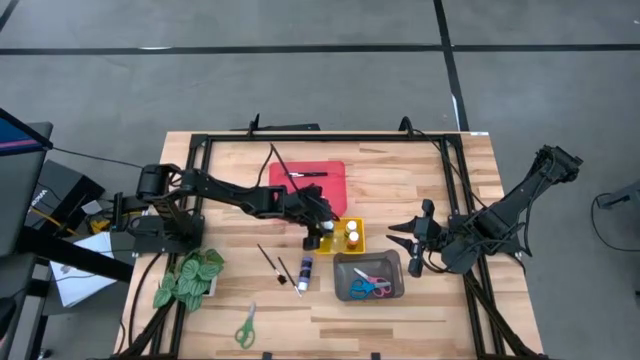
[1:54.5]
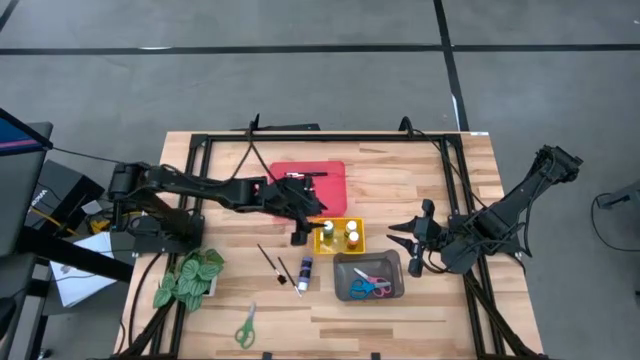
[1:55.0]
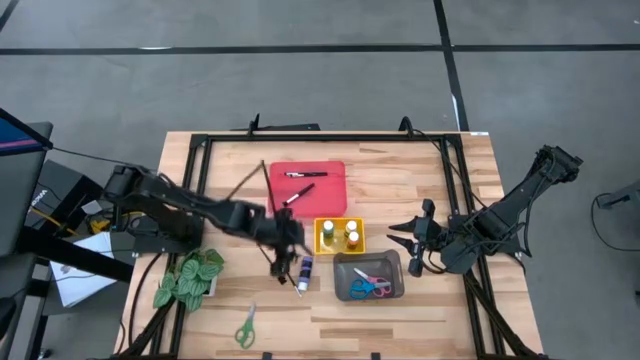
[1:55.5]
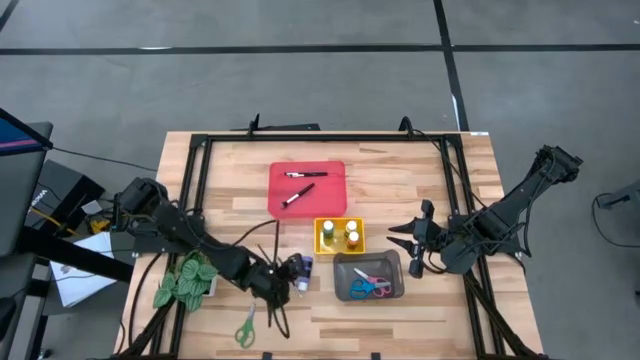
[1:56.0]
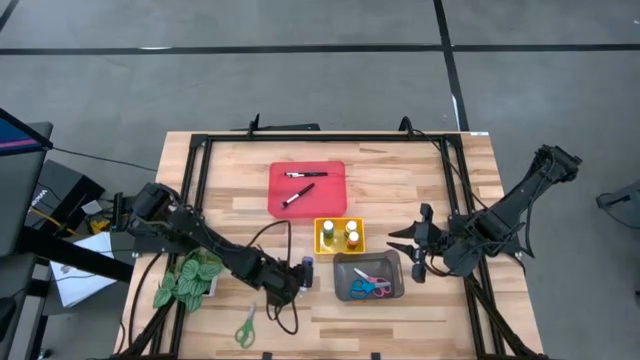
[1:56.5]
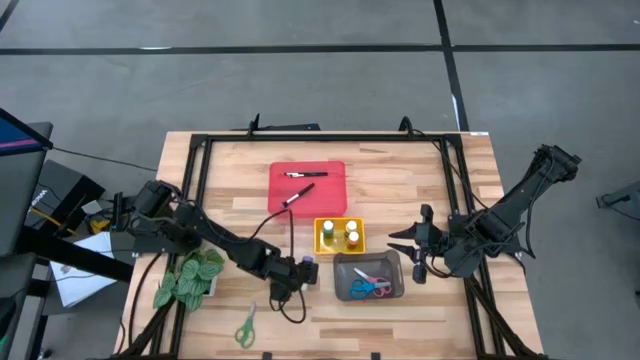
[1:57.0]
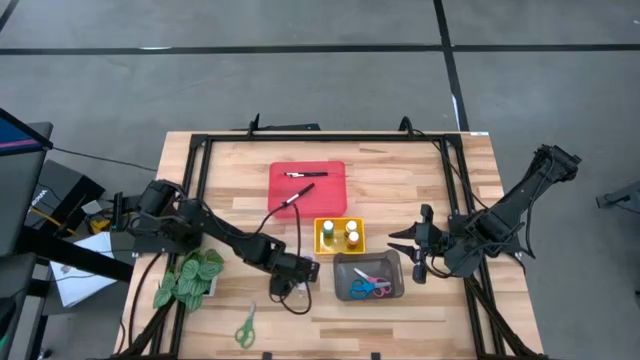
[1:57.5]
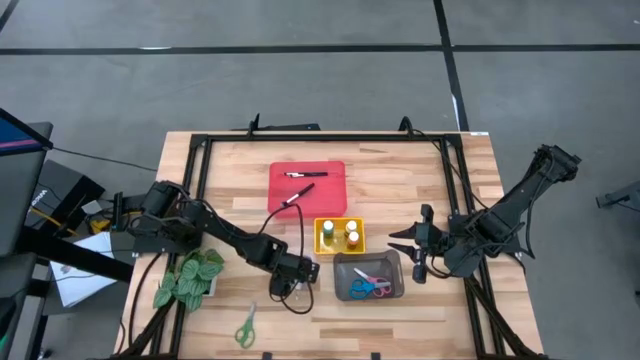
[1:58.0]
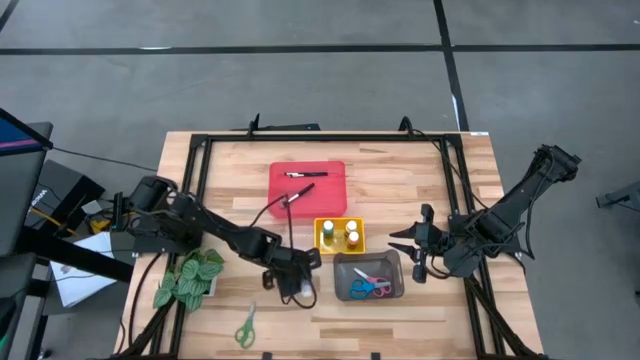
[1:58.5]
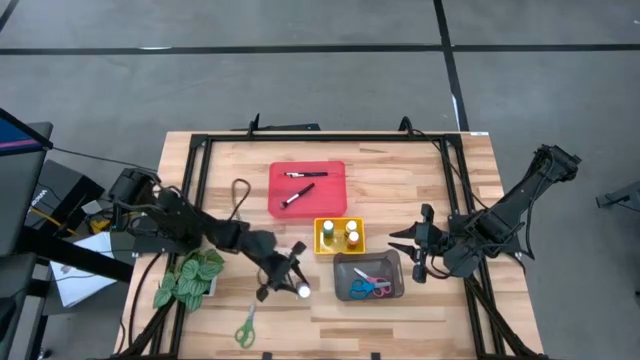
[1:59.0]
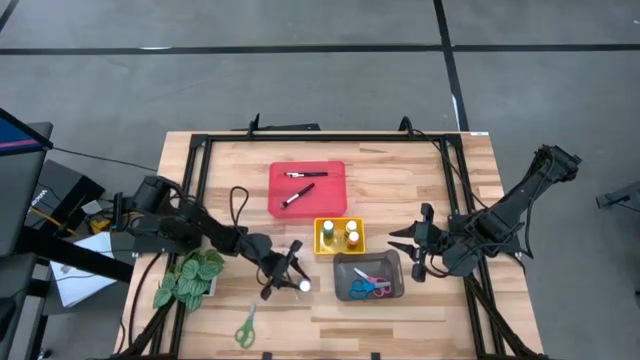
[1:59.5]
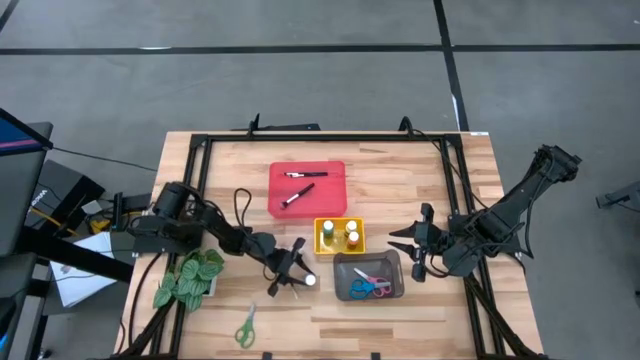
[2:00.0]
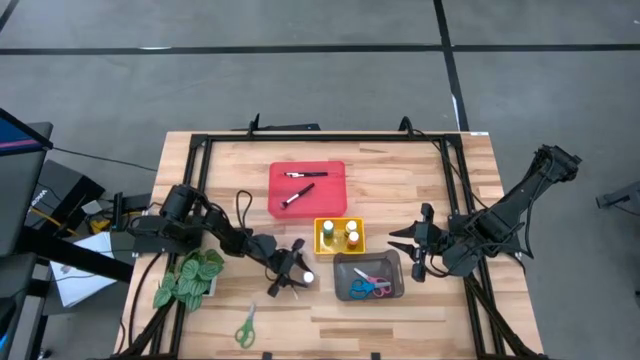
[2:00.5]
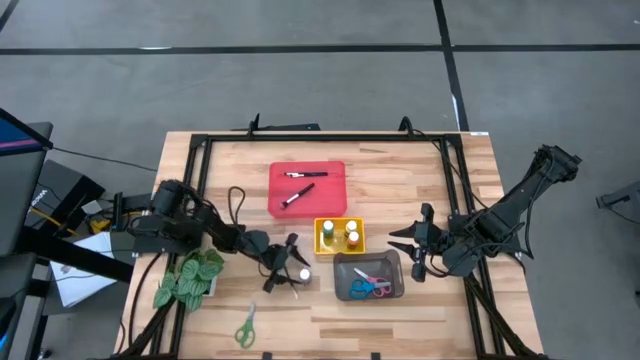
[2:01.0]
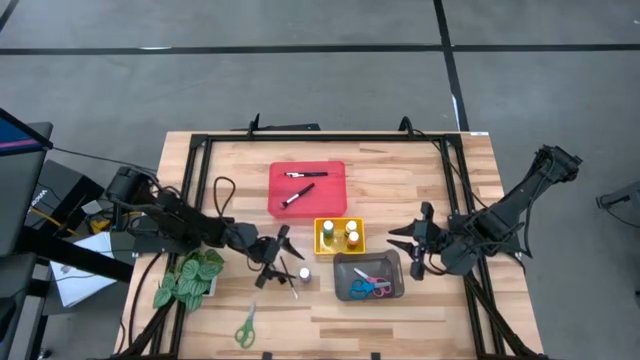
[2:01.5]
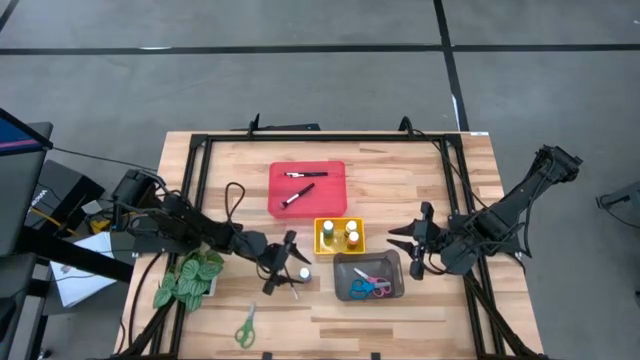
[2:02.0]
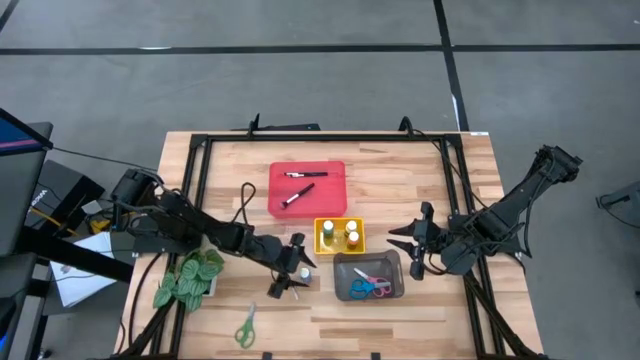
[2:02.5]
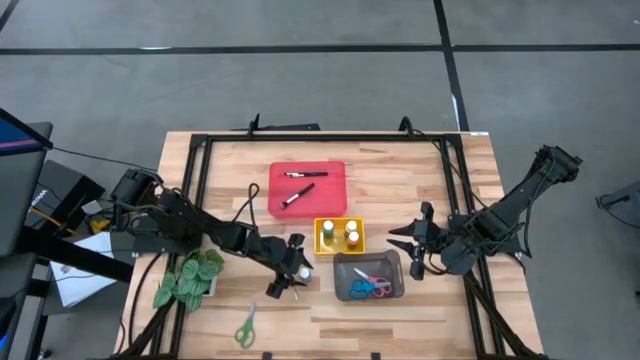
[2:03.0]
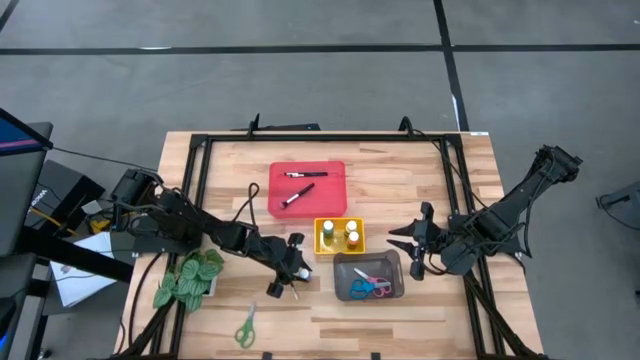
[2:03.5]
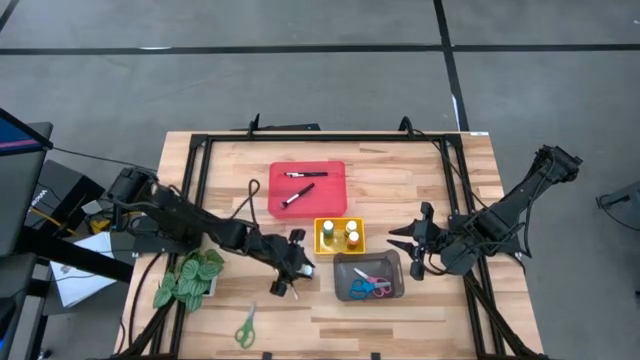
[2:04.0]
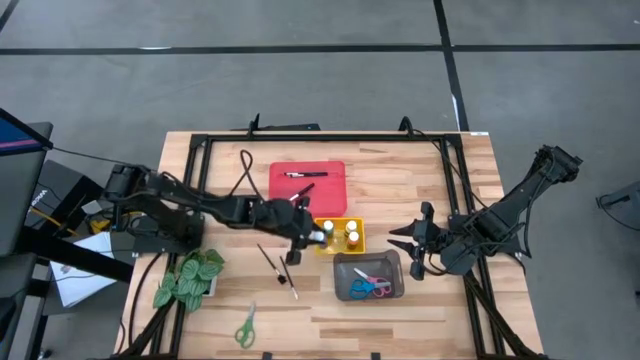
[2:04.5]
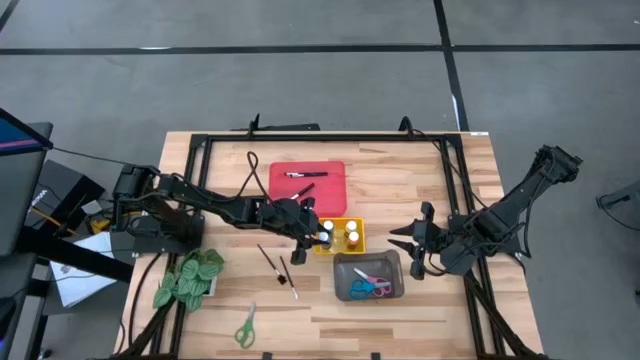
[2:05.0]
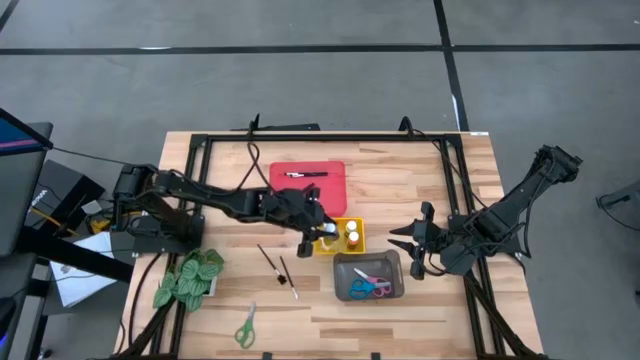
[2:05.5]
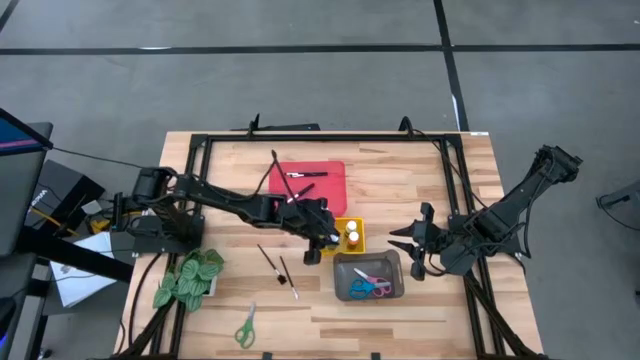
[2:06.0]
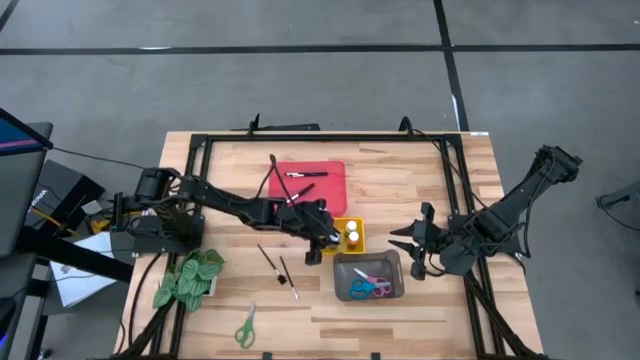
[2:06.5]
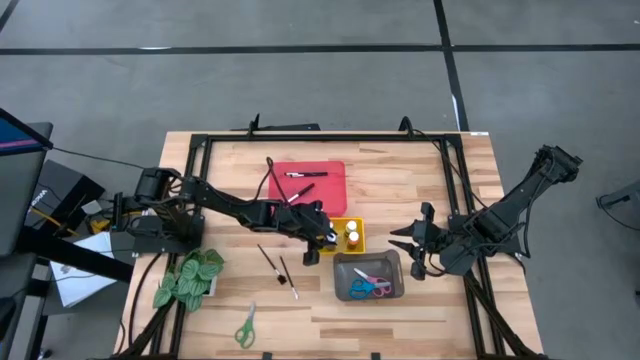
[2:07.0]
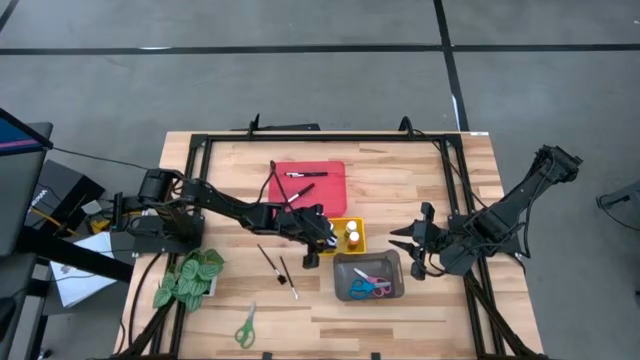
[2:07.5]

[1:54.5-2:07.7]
Task: Pick & Place Paint Supplies
Put the purple paint bottle into the yellow bin

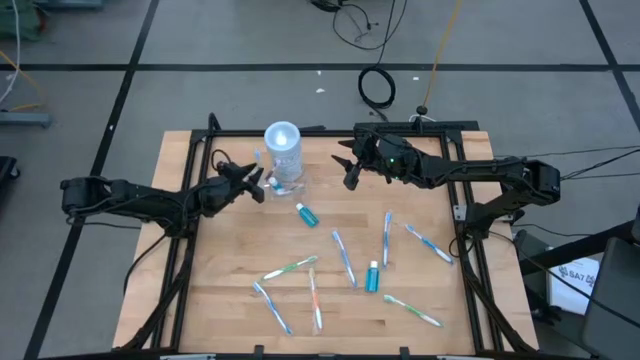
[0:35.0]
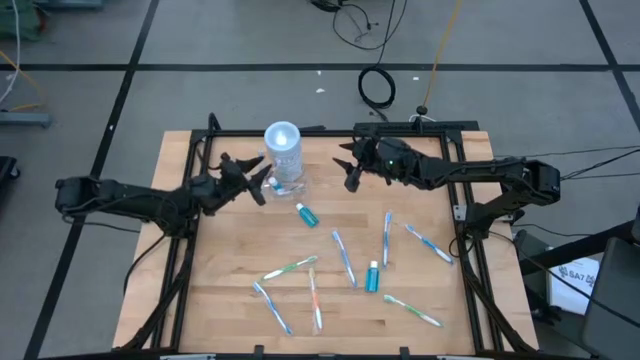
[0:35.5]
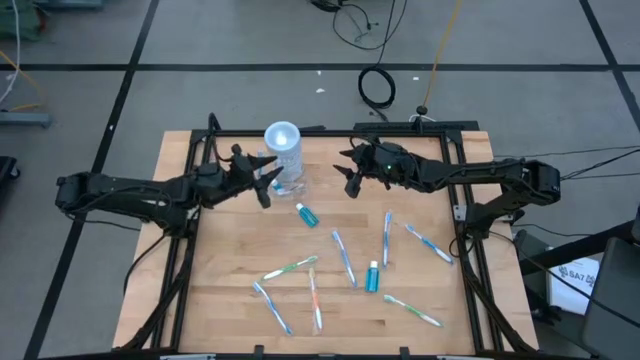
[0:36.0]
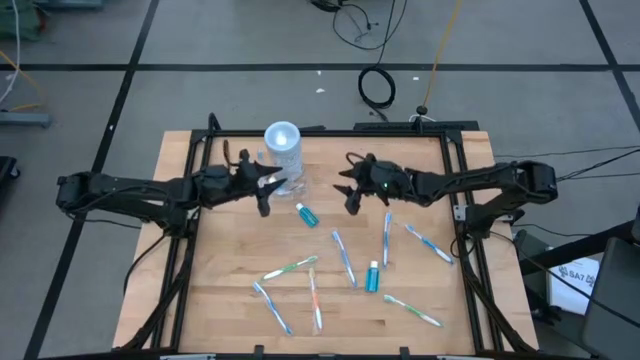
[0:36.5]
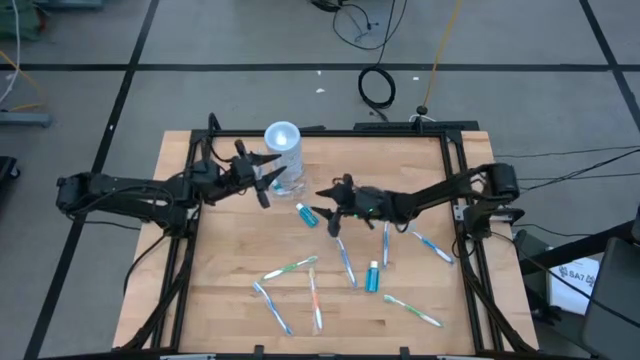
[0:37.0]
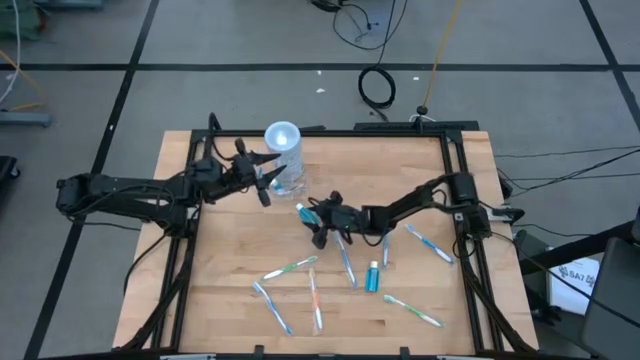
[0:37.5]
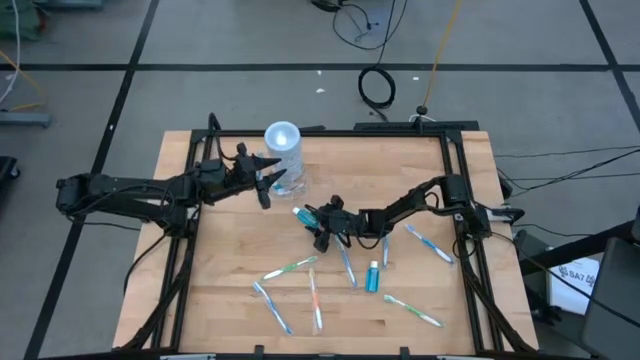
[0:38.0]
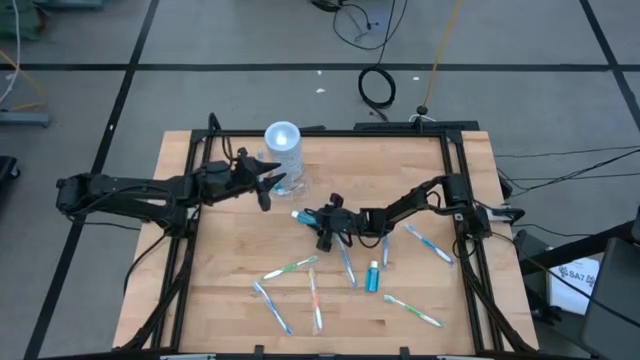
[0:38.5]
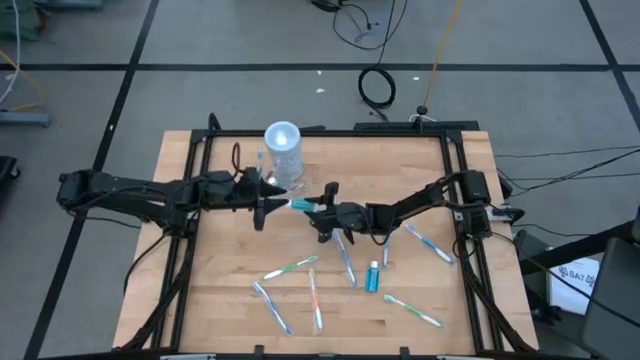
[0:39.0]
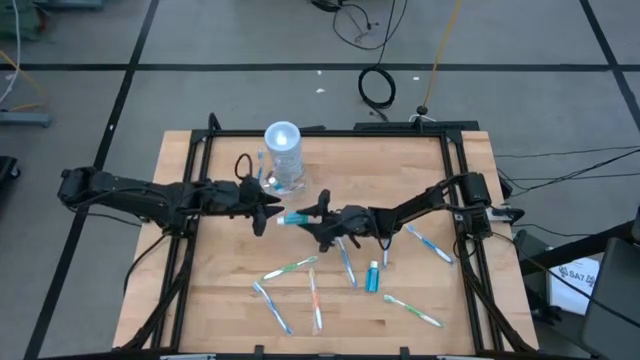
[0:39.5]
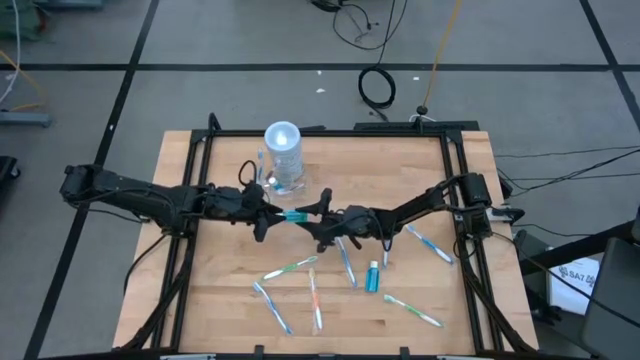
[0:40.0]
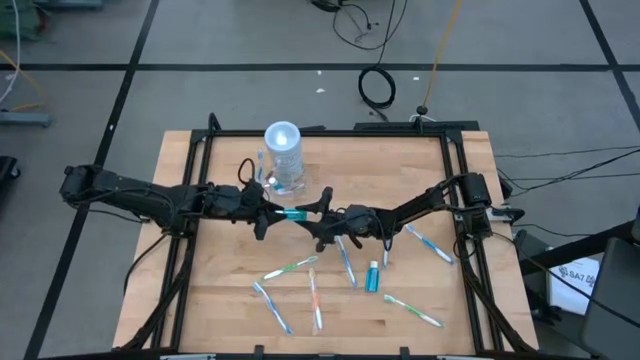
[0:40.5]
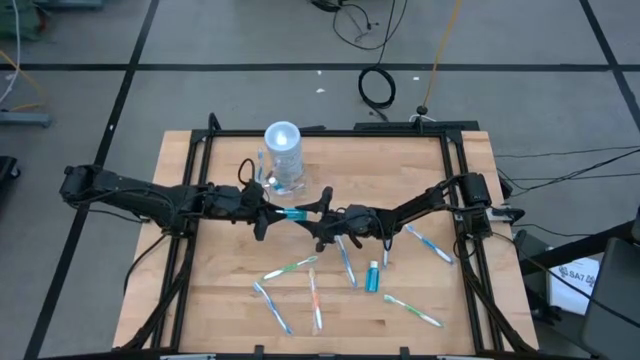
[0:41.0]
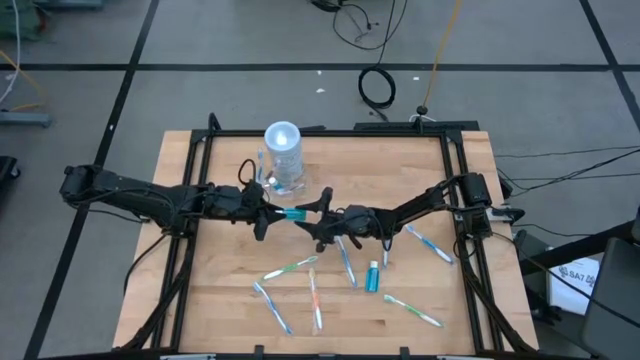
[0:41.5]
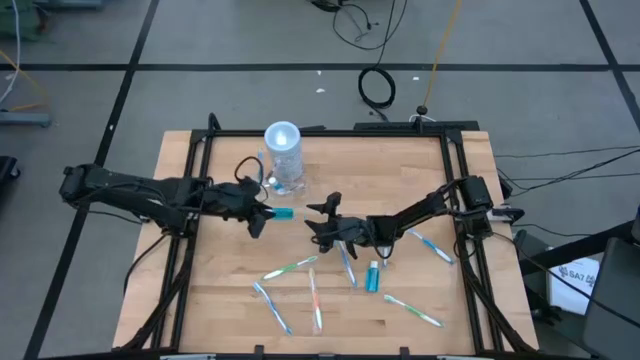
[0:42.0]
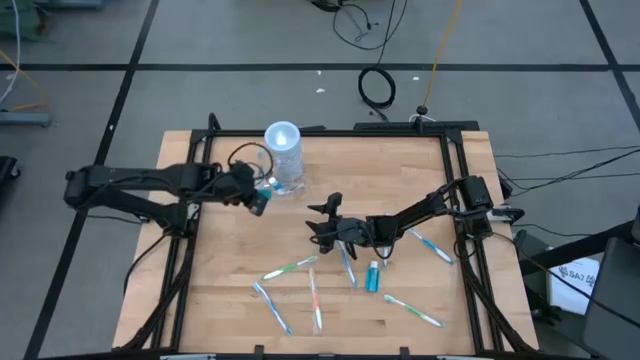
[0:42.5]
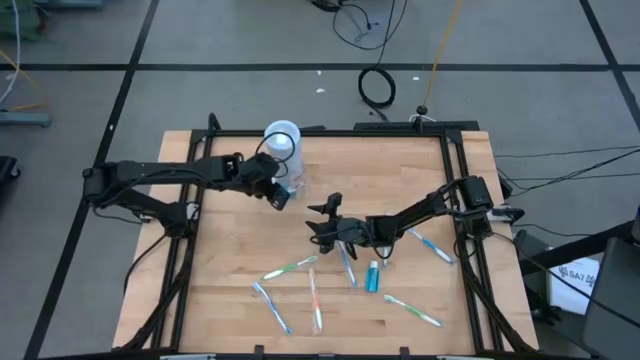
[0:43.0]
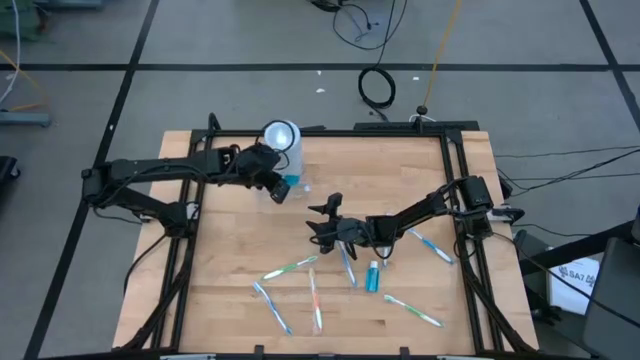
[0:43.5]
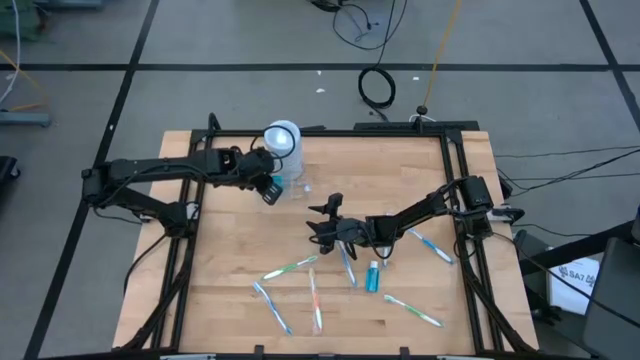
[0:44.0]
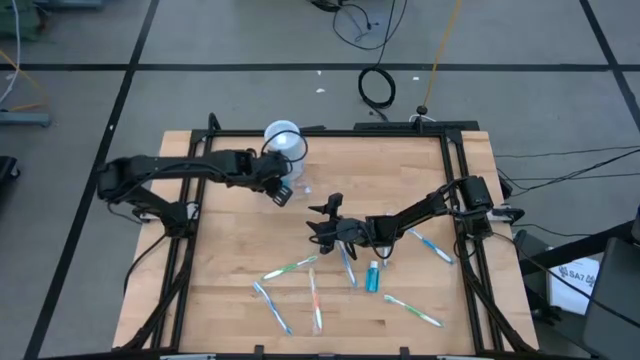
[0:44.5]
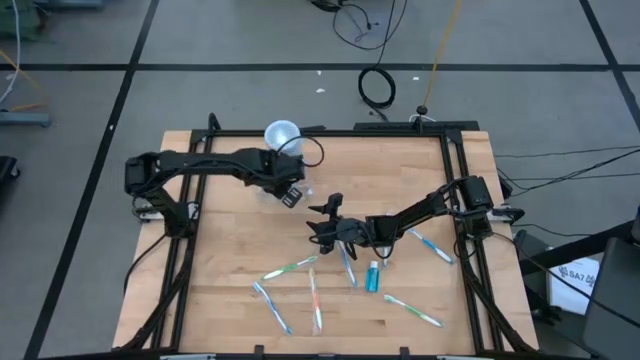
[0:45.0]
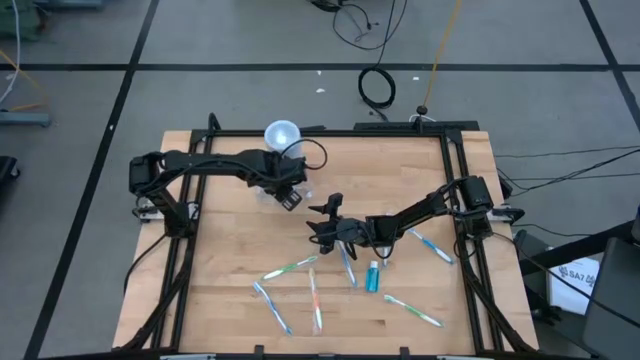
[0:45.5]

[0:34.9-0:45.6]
Task: Pick & Place toothbrushing station
Put the top blue mouthwash into the transparent organizer
